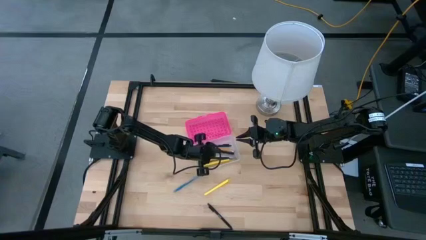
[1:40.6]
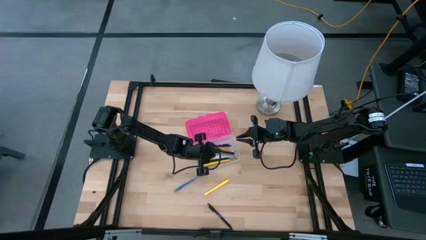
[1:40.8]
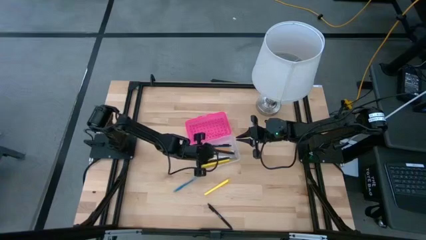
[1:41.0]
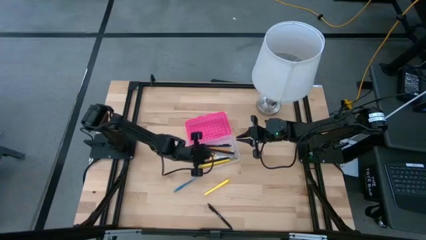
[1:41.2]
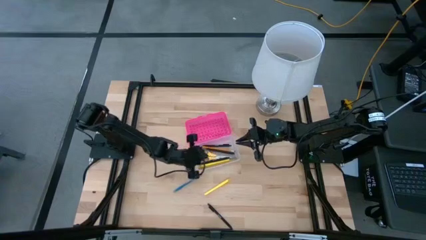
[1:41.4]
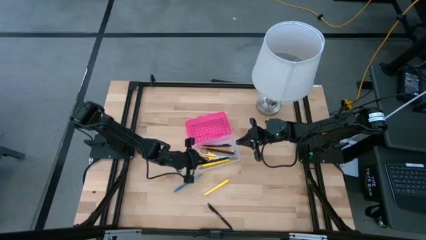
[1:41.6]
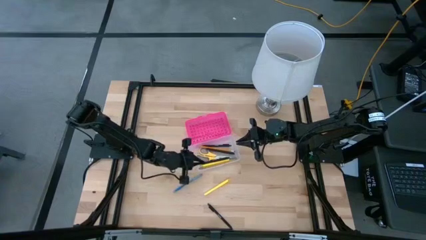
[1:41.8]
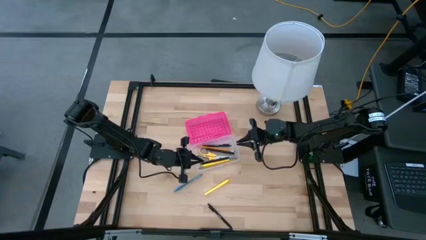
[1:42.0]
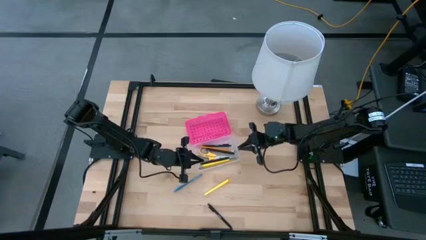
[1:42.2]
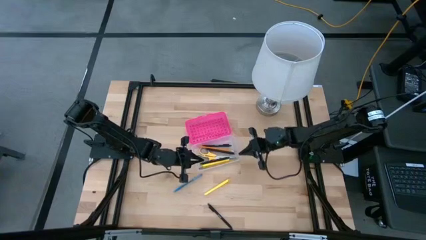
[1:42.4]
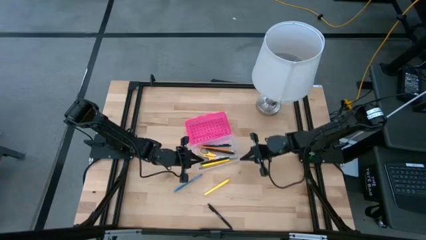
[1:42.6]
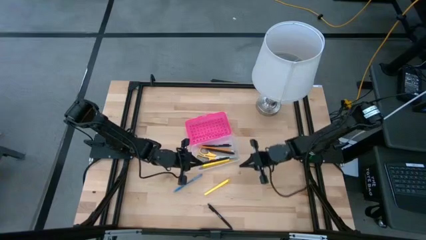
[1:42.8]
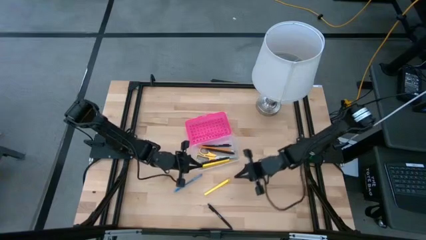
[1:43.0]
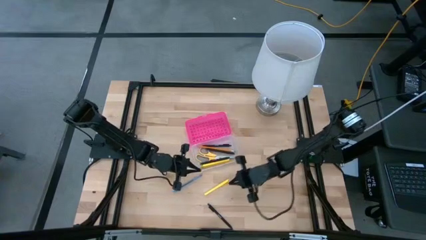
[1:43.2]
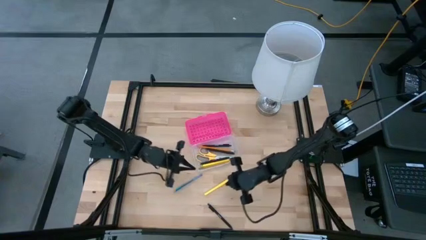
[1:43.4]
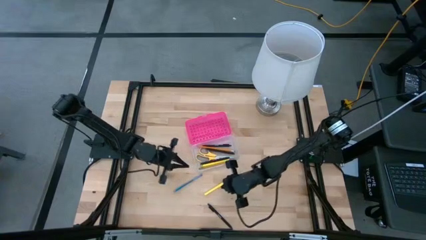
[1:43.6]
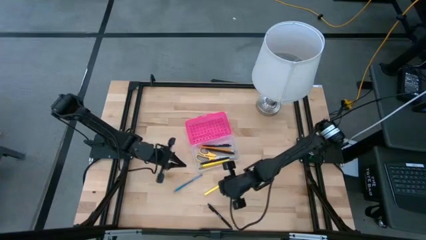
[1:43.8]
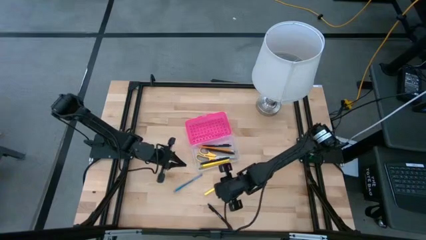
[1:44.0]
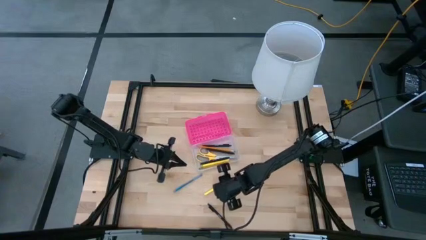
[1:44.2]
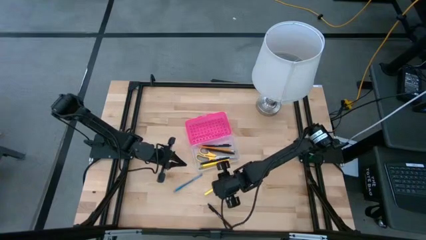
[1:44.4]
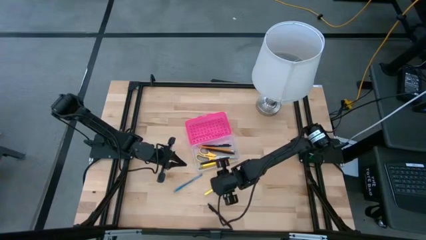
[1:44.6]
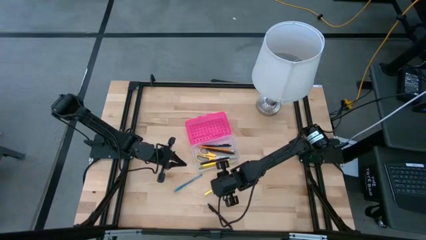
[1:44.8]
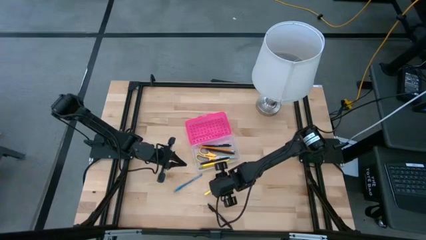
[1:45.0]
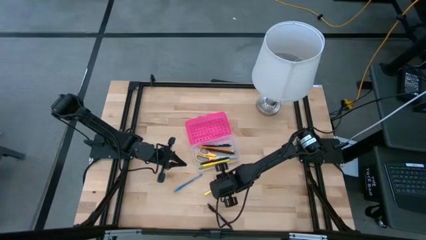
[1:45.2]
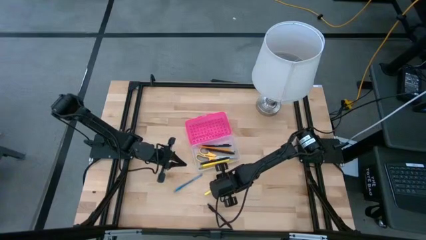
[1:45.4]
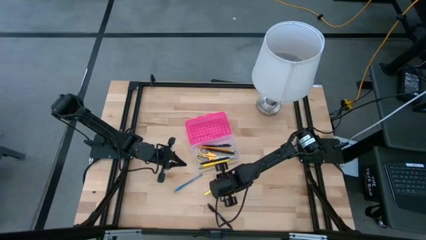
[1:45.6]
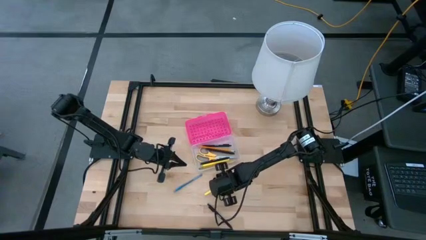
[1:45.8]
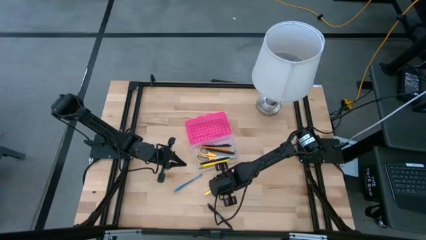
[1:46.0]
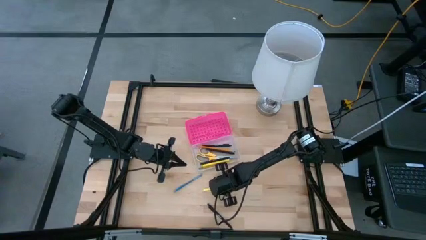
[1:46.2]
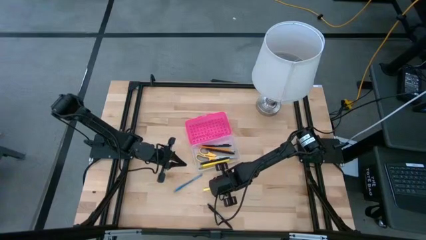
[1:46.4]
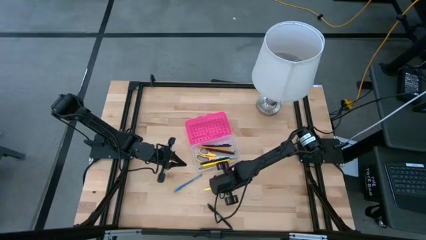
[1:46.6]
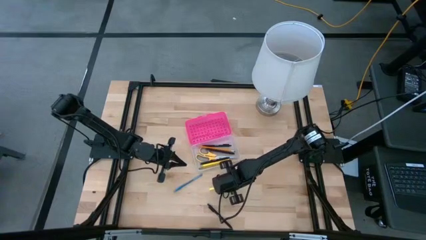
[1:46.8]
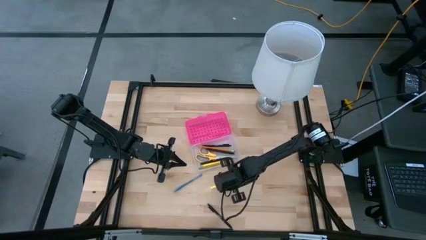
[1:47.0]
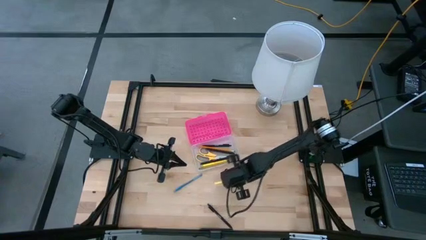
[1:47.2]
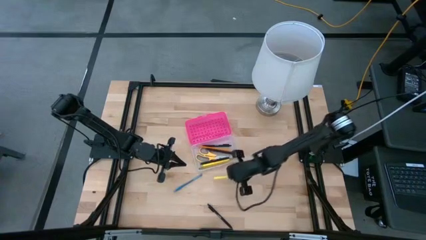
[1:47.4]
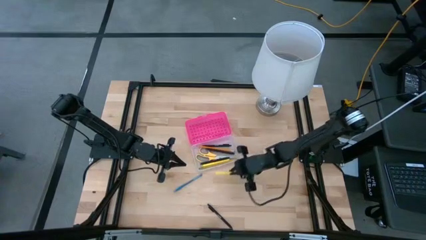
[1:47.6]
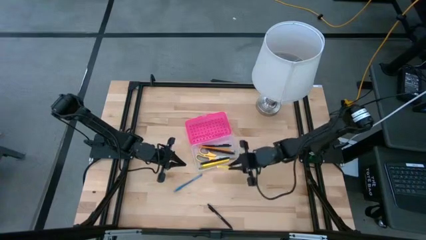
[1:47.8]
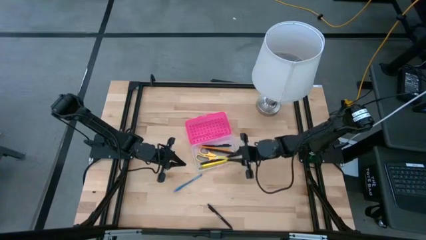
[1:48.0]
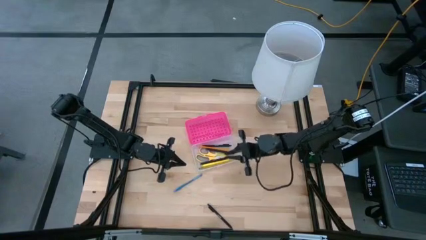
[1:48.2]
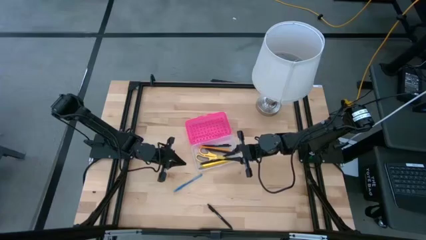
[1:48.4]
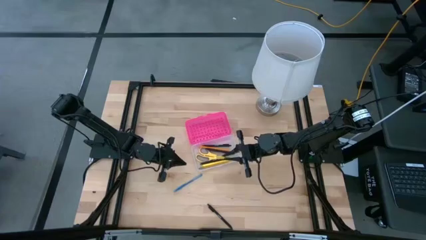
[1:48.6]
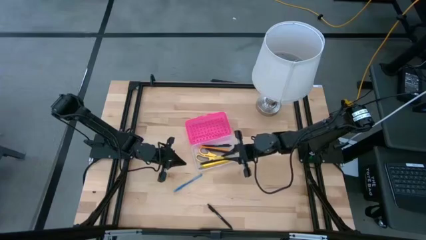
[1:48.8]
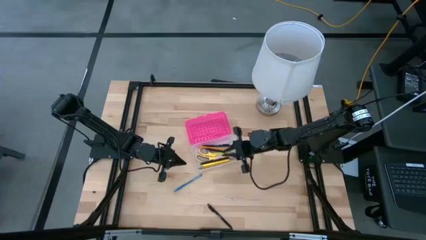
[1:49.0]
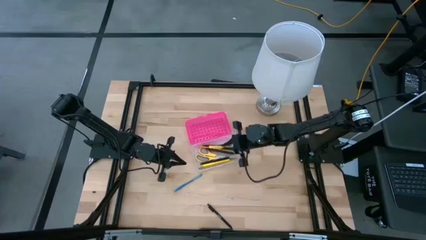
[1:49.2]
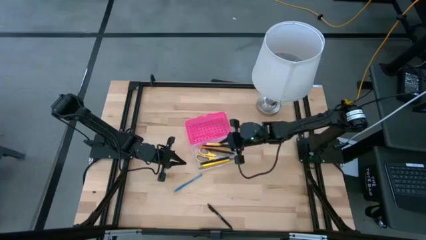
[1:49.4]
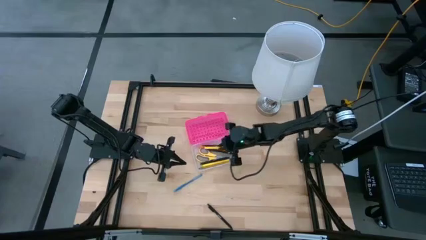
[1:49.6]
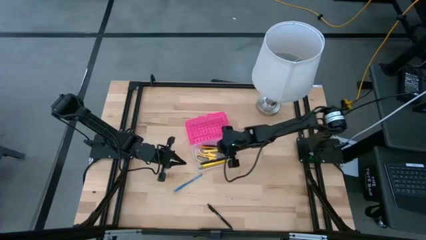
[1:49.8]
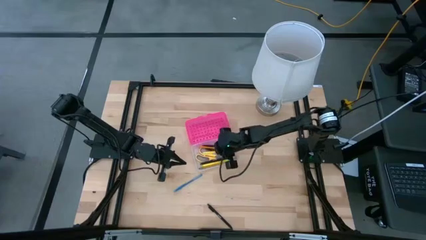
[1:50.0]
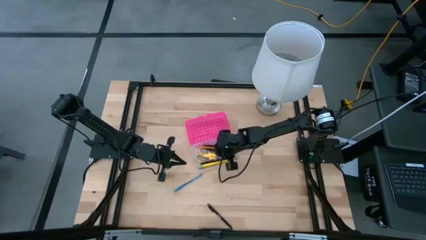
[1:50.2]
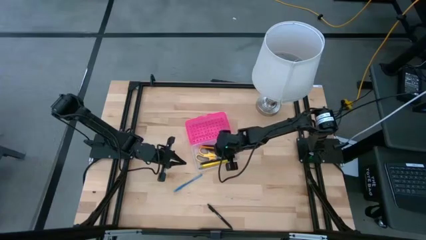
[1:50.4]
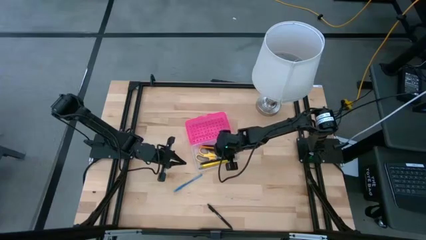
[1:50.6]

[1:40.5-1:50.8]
Task: Pick & place school supplies into a supply box
Put the yellow pen into the pink supply box

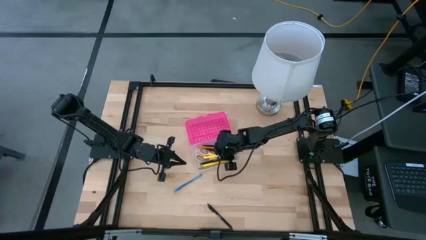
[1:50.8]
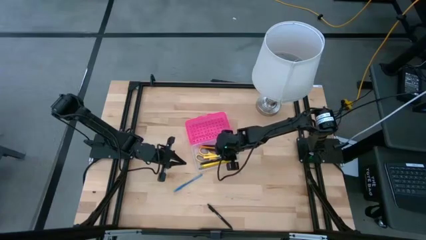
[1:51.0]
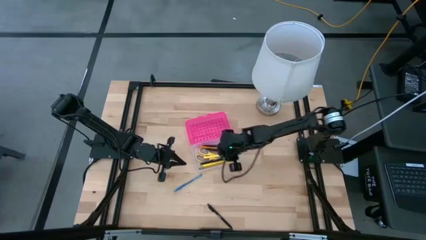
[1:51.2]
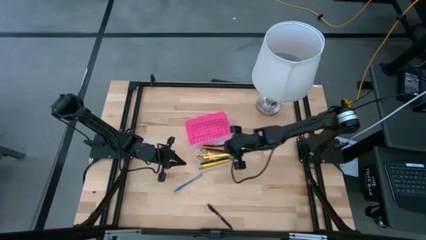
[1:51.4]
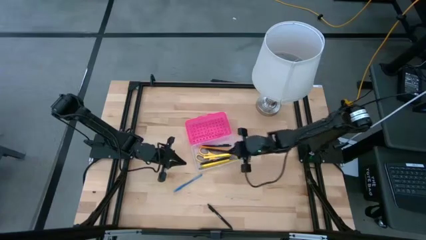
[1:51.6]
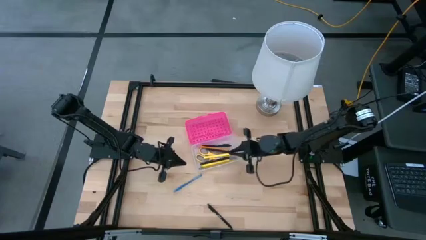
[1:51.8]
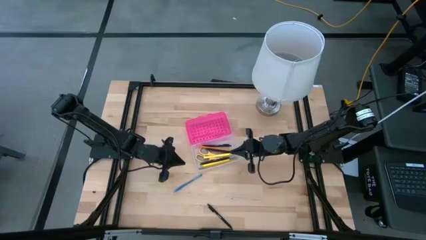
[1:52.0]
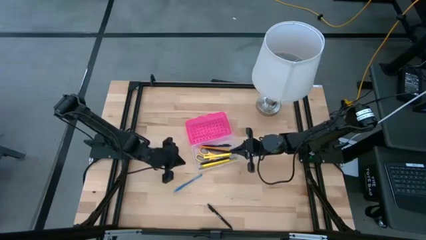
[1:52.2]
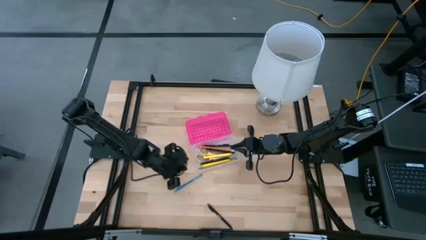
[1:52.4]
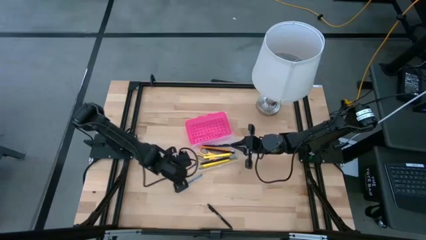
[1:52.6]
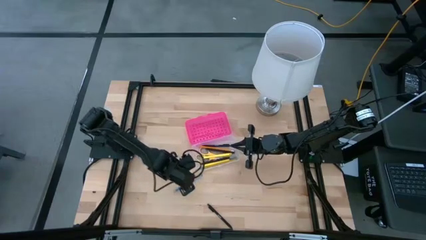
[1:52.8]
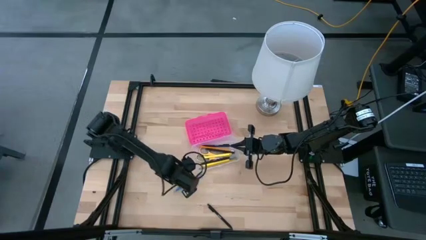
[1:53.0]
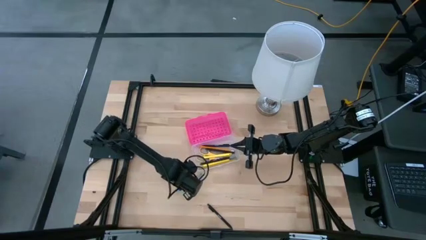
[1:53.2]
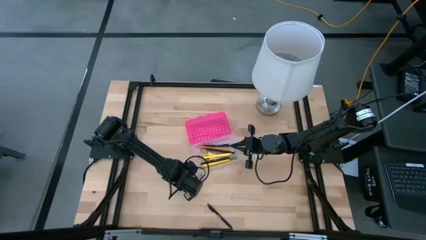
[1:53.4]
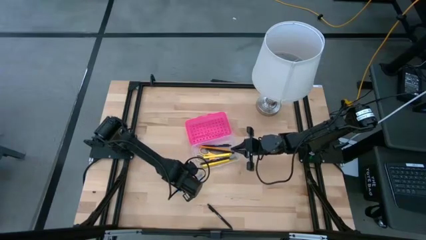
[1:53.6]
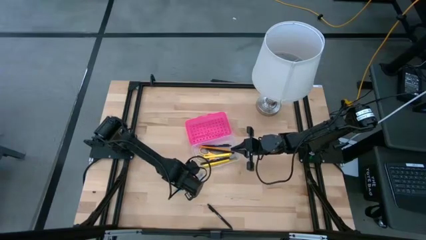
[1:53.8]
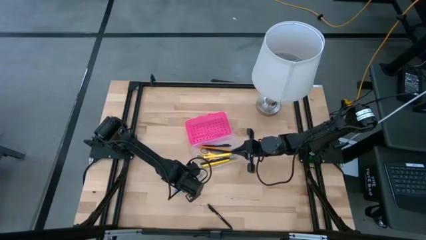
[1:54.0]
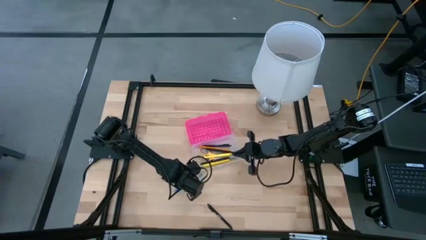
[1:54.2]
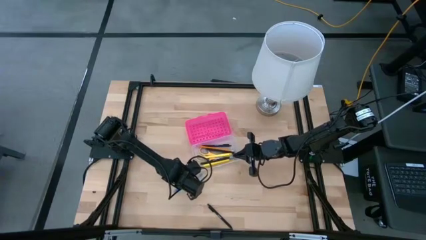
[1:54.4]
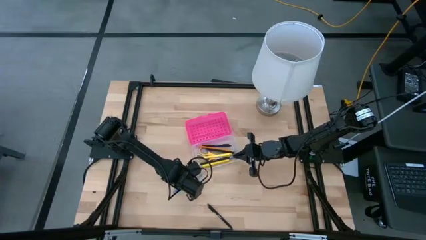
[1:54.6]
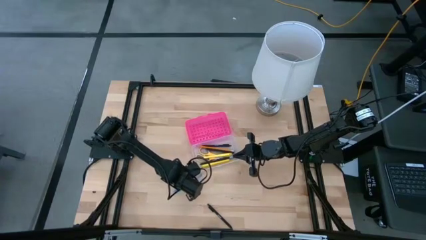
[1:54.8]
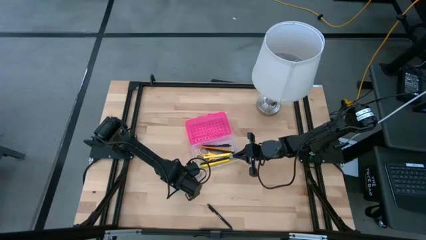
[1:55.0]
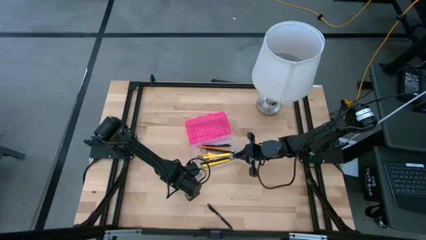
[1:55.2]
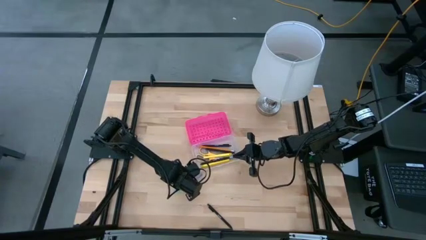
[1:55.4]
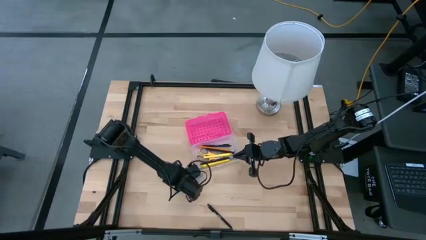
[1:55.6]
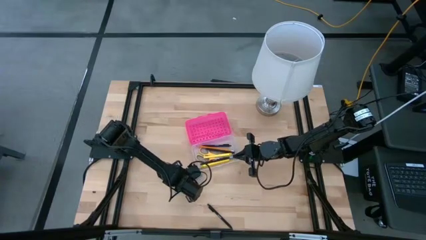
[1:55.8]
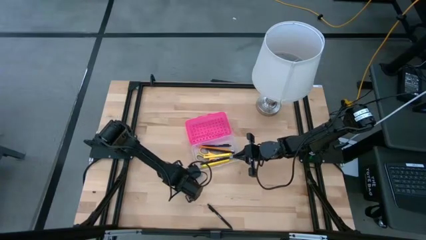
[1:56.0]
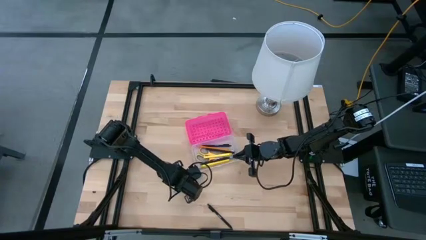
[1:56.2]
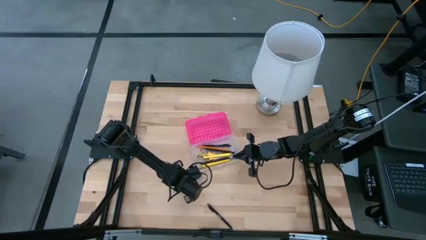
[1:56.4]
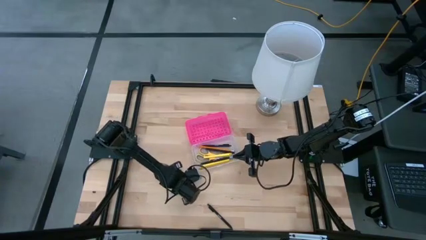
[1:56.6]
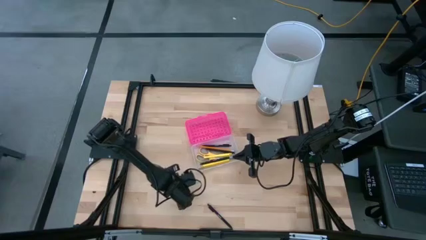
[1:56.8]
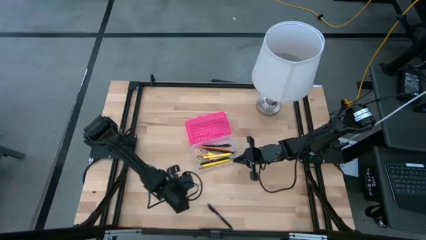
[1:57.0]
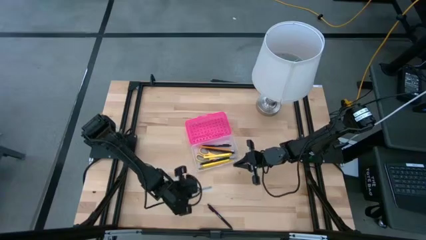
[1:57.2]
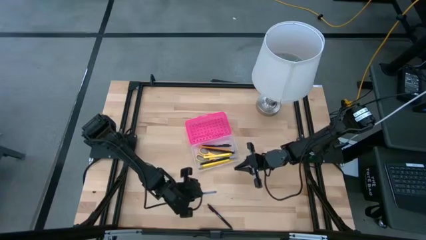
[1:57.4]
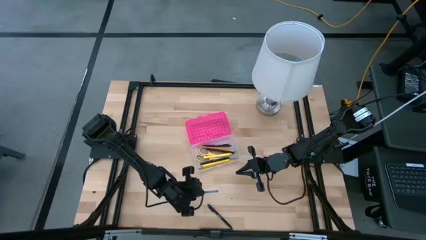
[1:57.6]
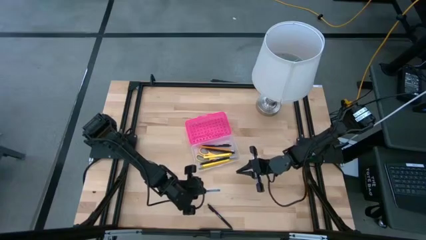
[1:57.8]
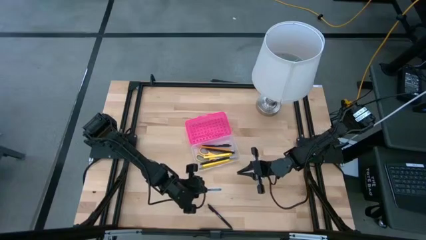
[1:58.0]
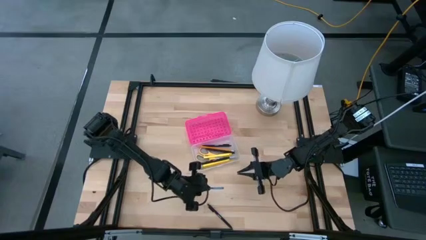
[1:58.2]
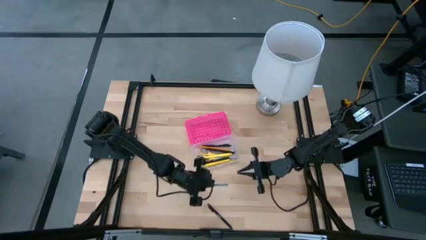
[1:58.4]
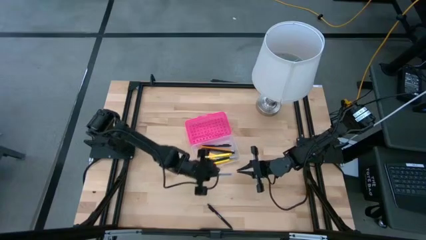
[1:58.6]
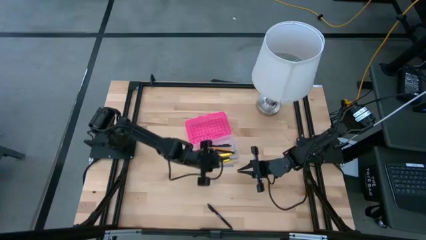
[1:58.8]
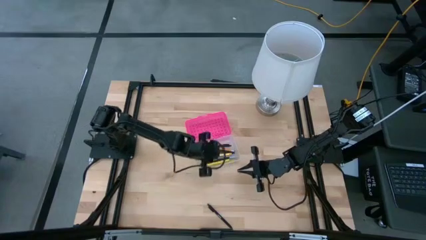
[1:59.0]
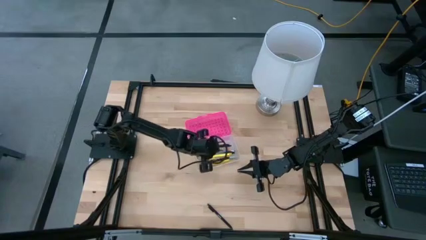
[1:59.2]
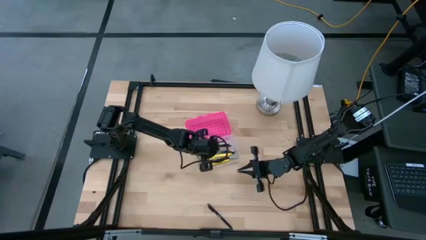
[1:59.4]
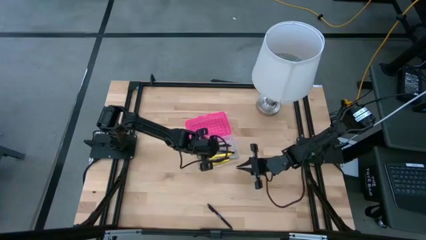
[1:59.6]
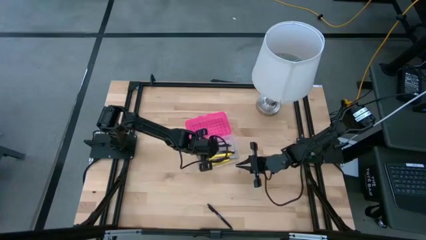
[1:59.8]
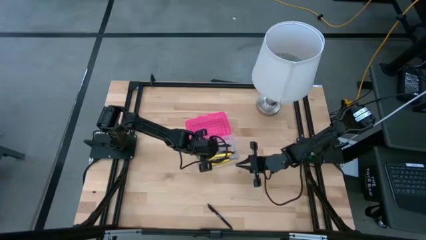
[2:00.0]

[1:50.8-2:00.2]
Put the blue pen into the pink supply box
